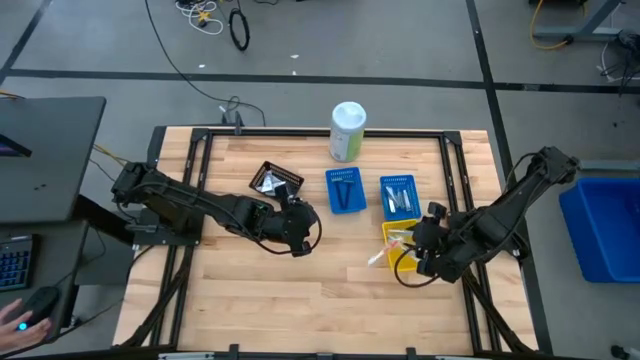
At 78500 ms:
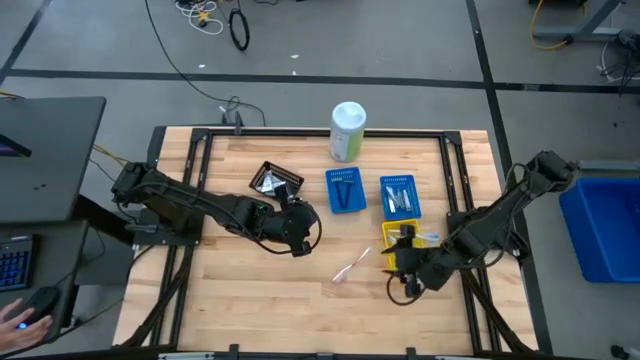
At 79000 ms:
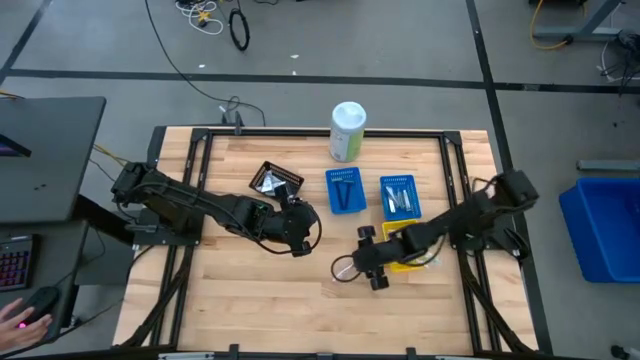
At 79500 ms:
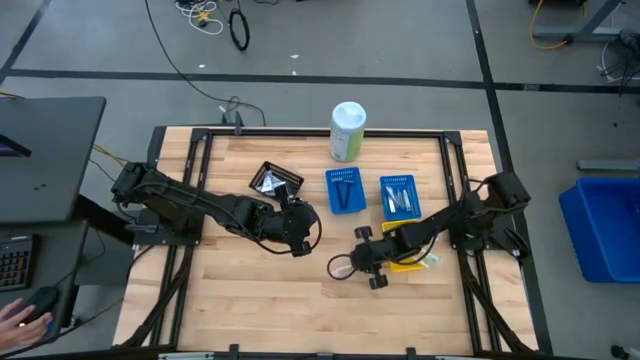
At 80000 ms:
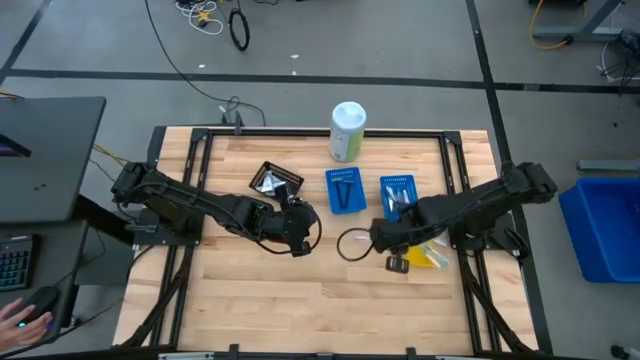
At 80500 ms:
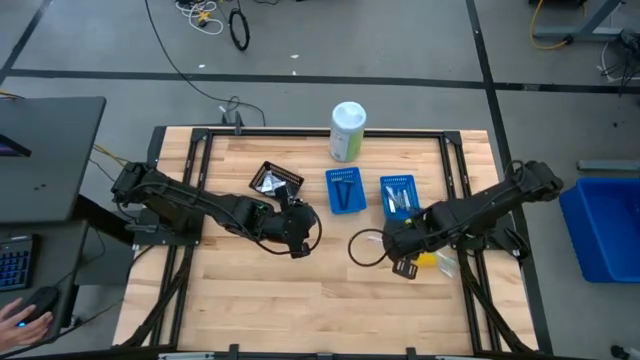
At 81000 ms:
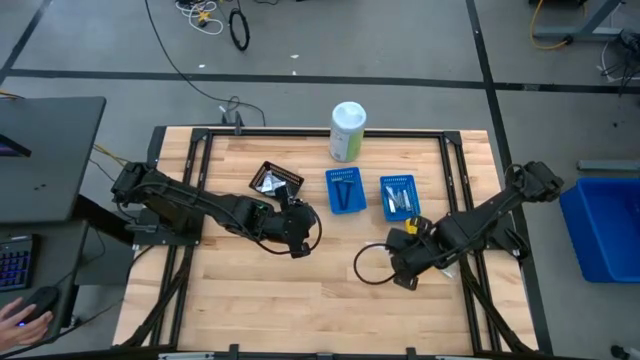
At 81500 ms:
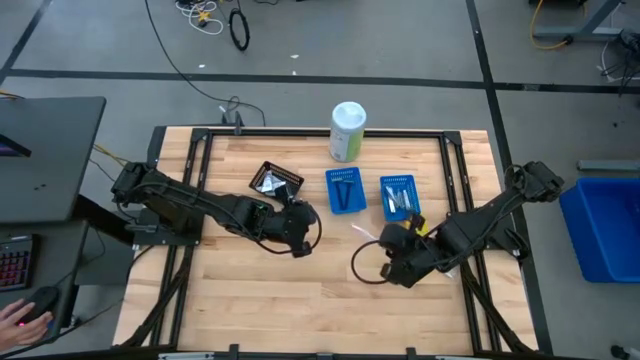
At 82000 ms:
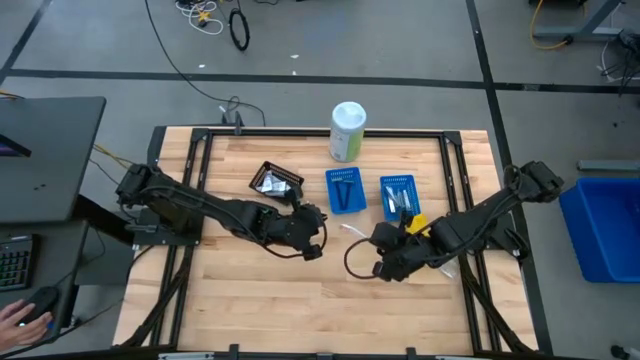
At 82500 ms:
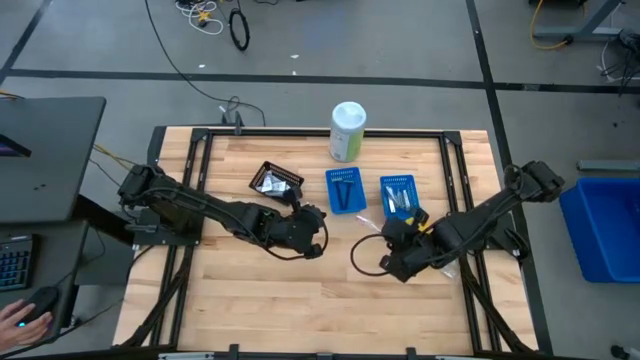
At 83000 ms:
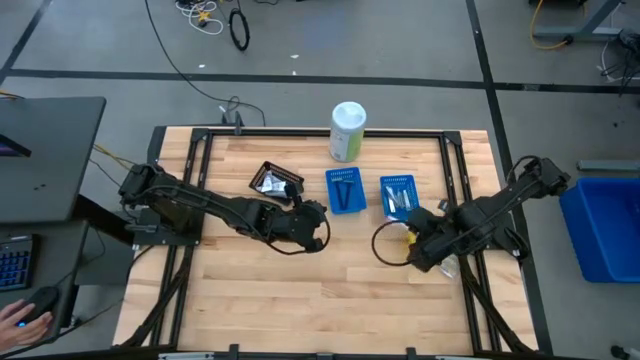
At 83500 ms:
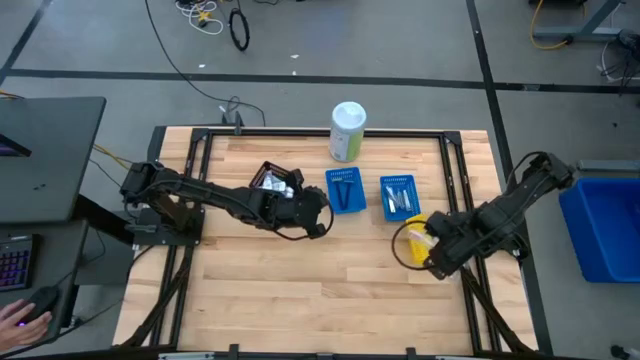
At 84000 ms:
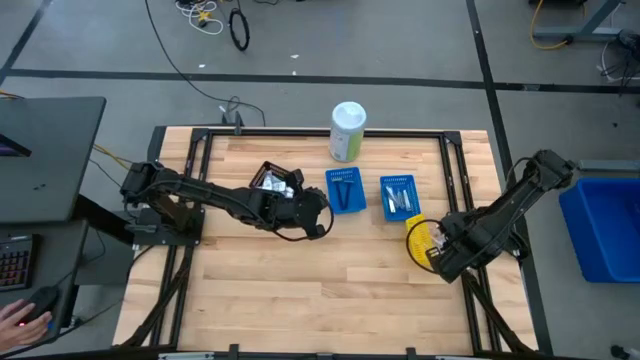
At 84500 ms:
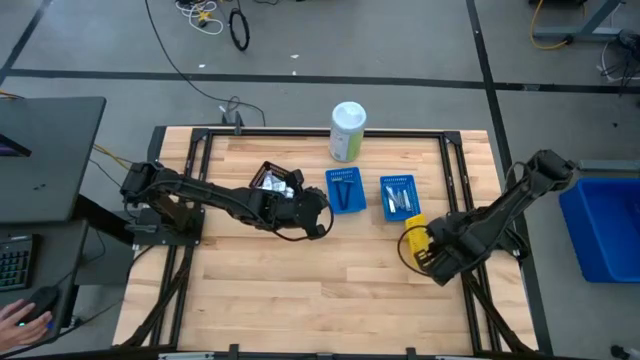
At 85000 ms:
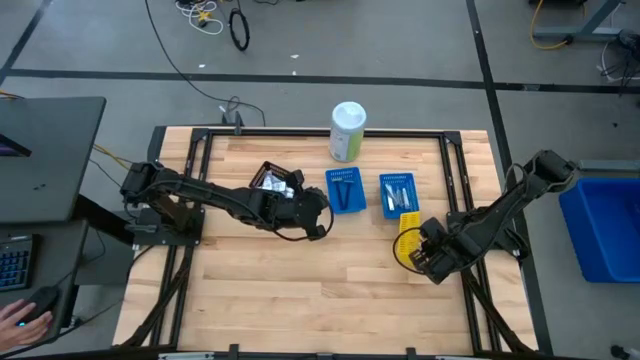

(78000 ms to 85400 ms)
Task: Pick & Place Travel size toiletries
Put the orange toothbrush into the yellow basket

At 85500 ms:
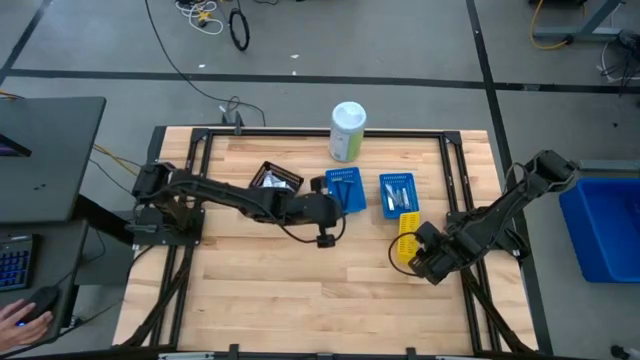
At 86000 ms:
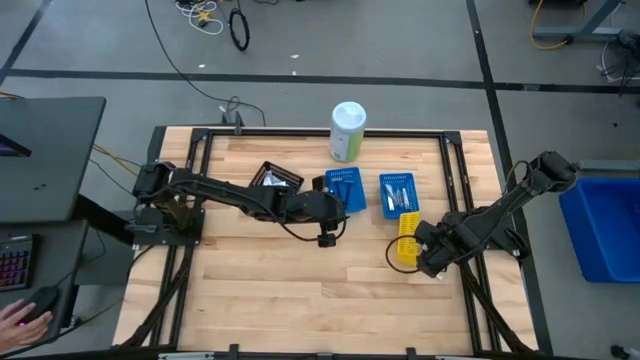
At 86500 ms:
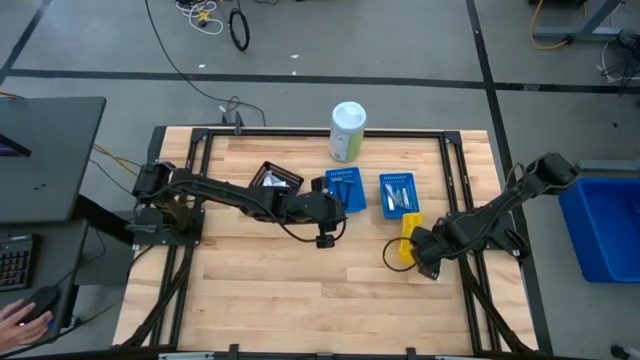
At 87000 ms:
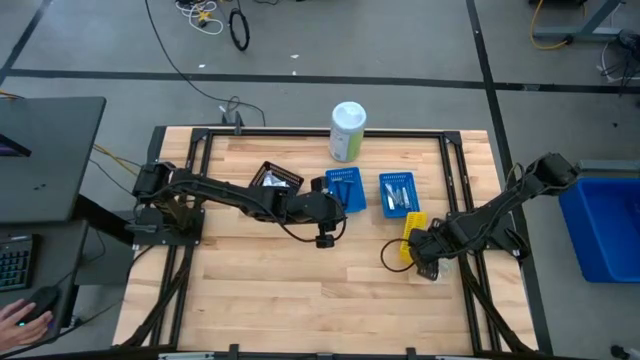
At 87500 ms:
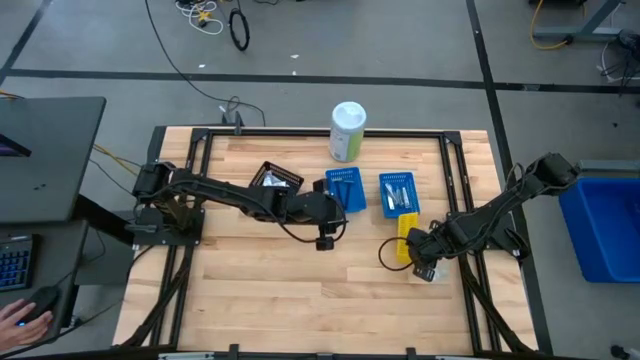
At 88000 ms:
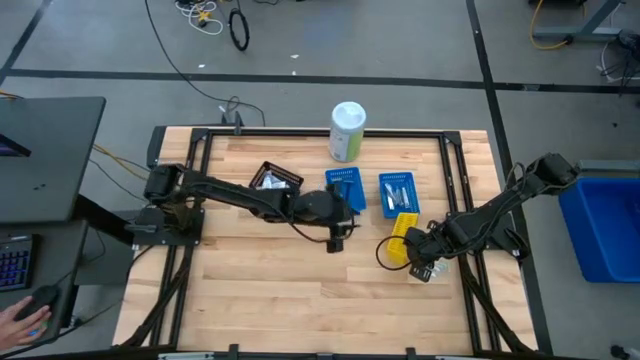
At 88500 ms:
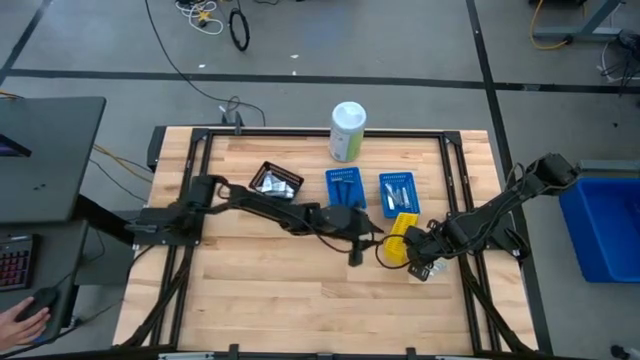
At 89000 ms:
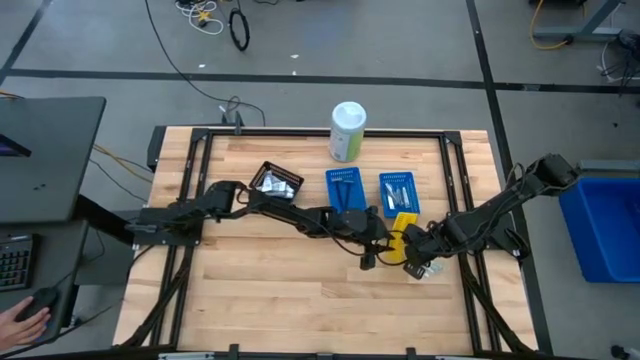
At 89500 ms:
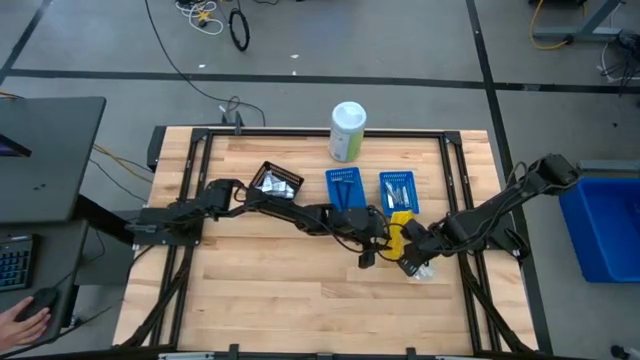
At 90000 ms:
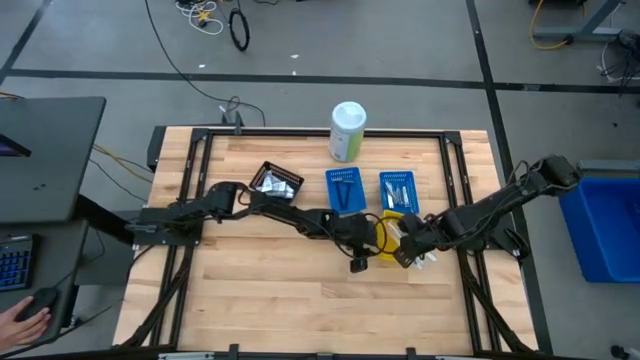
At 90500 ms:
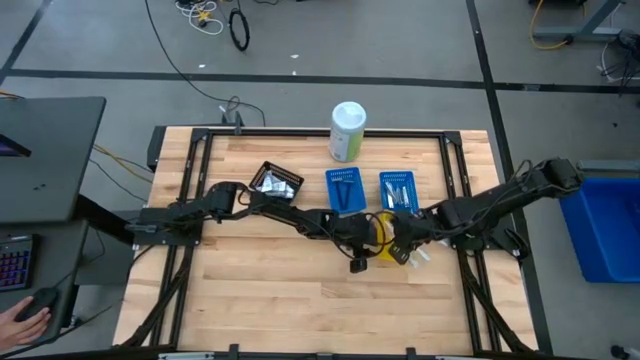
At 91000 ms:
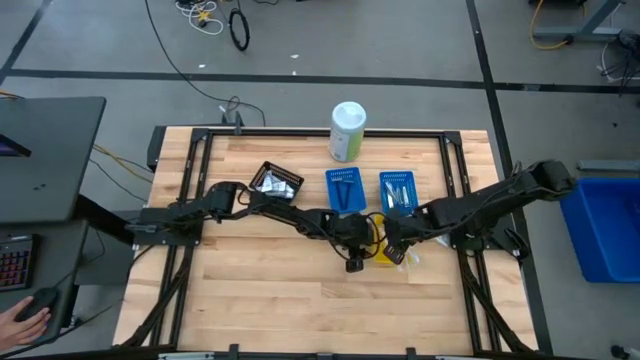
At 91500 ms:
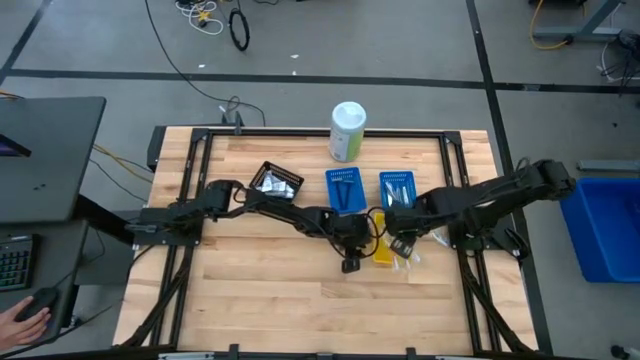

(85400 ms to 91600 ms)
Adjust the yellow basket

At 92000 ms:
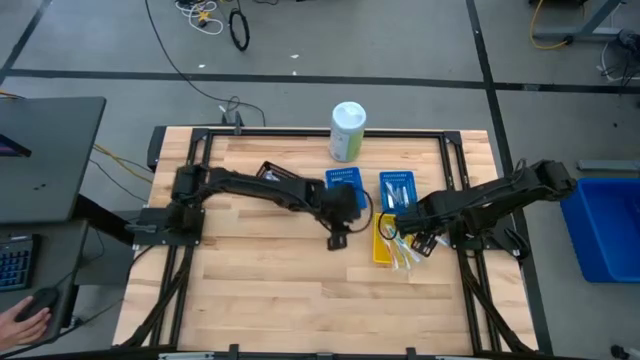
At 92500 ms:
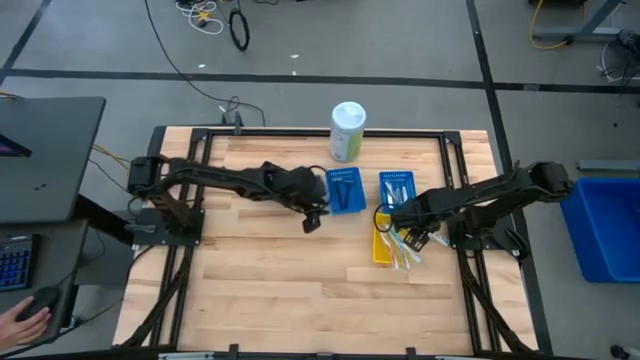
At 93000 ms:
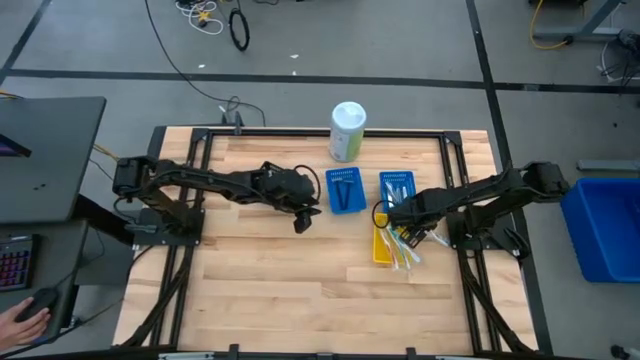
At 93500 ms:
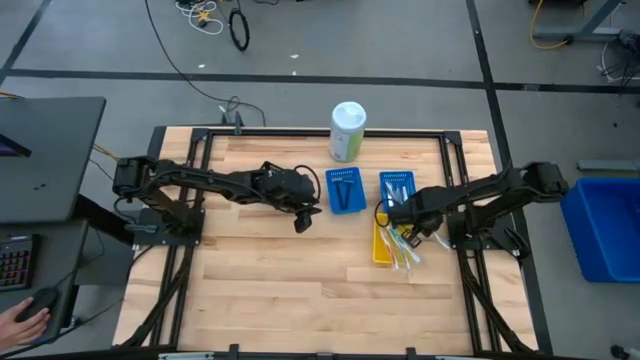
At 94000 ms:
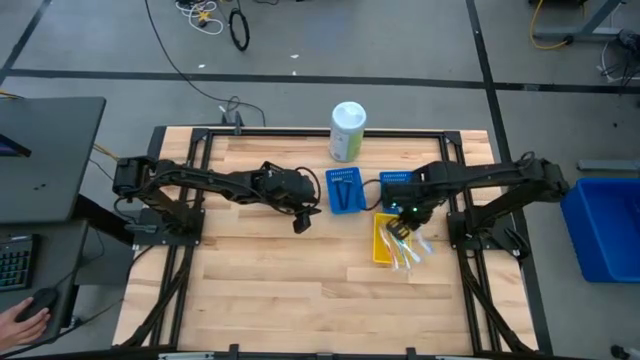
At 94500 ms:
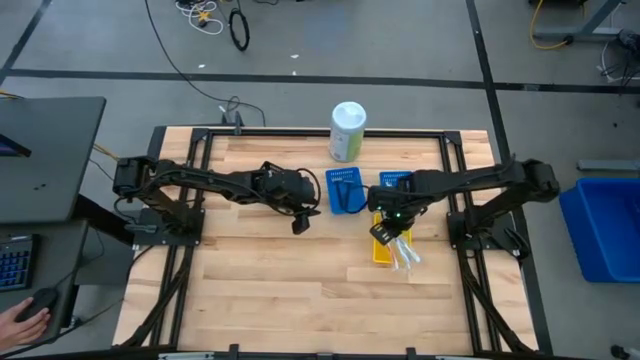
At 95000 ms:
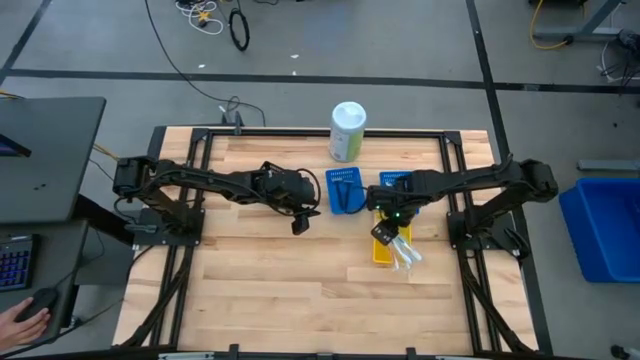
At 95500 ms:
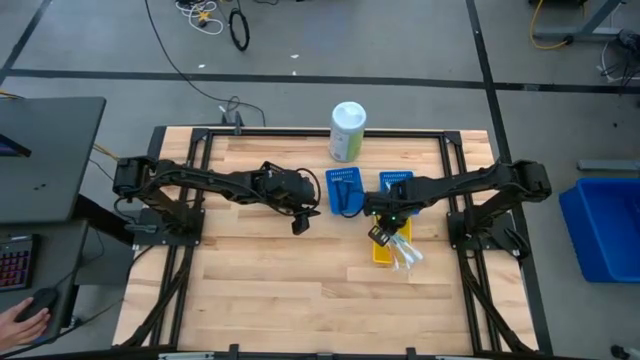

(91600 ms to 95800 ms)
Put the blue toothbrush into the yellow basket

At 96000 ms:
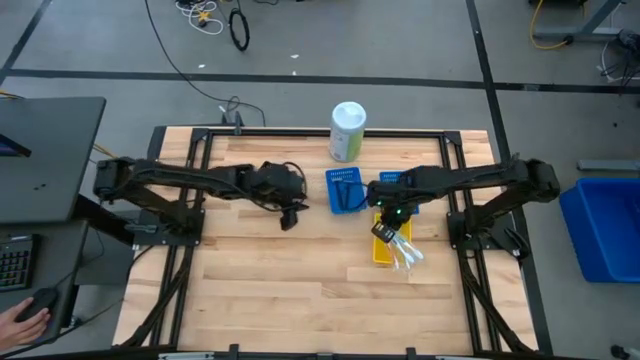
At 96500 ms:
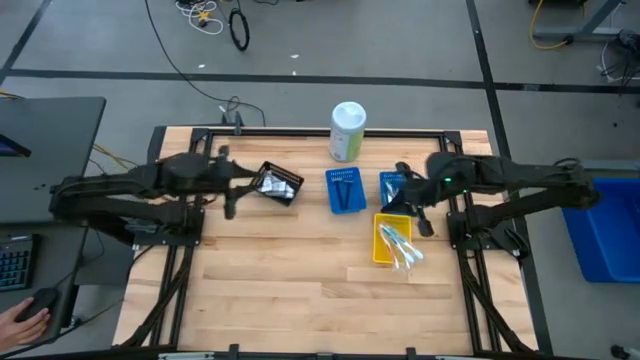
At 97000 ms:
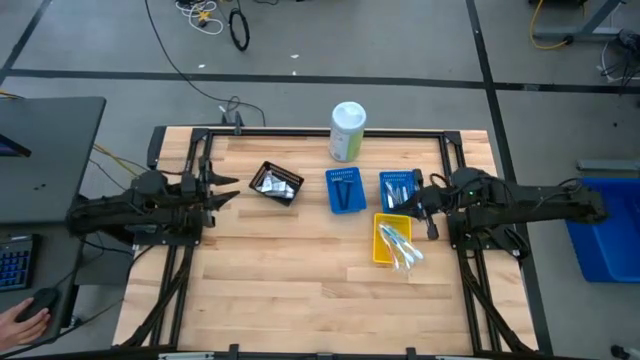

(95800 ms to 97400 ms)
Return to Home Position

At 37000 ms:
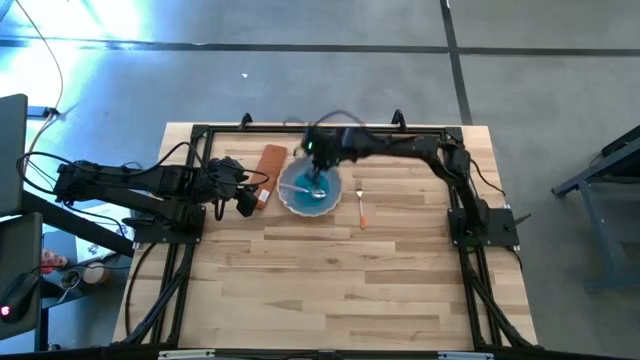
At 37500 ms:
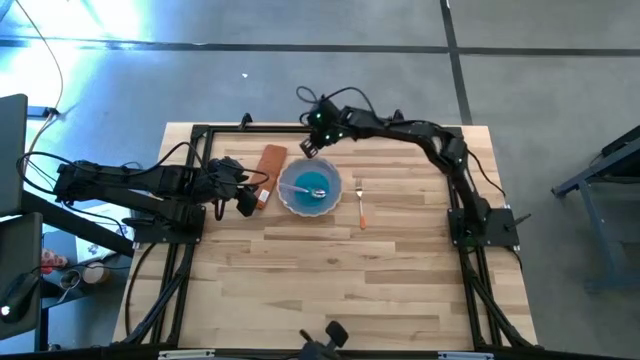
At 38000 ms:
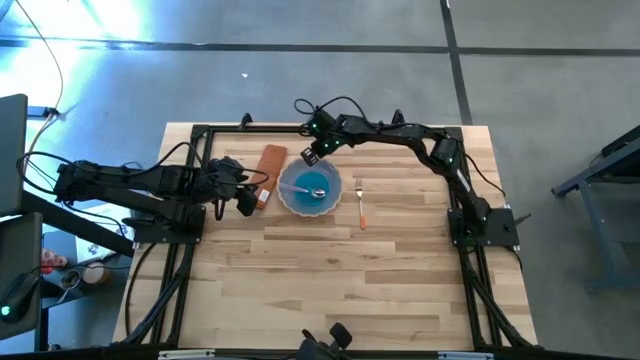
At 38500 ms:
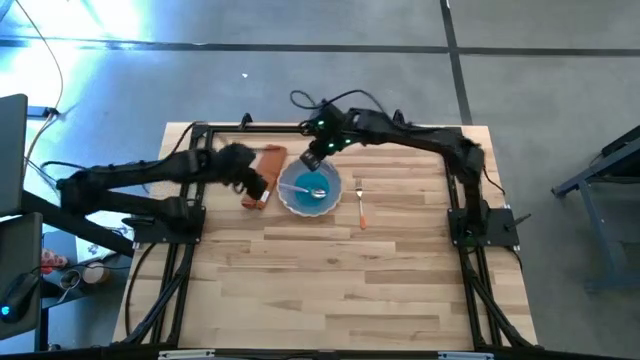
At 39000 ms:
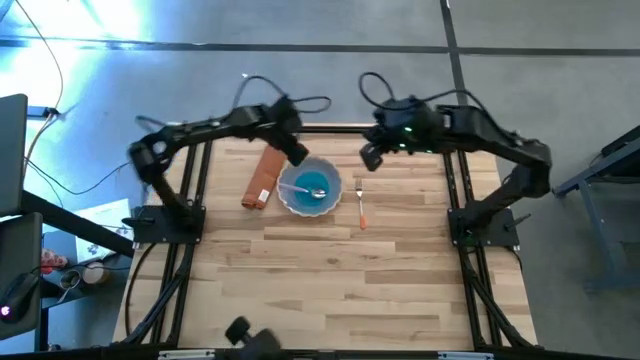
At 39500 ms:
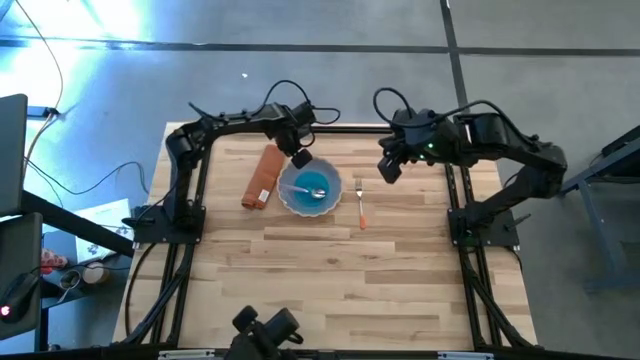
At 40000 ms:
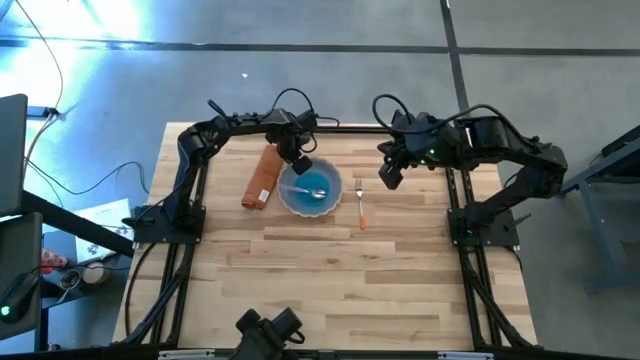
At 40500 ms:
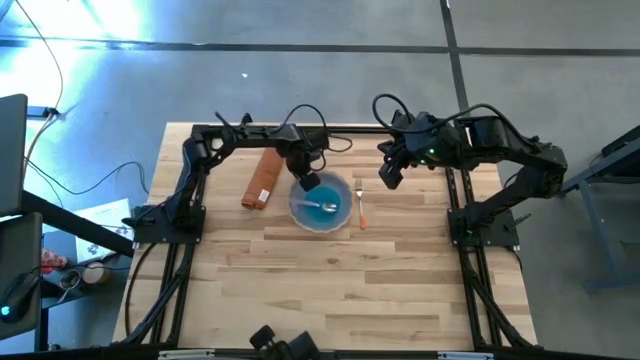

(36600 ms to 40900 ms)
Task: Set table place
Adjust the light blue plate
